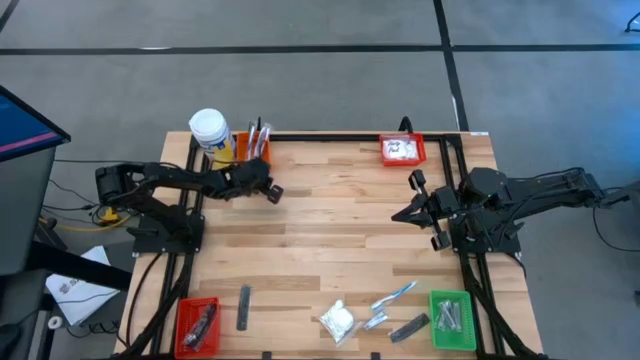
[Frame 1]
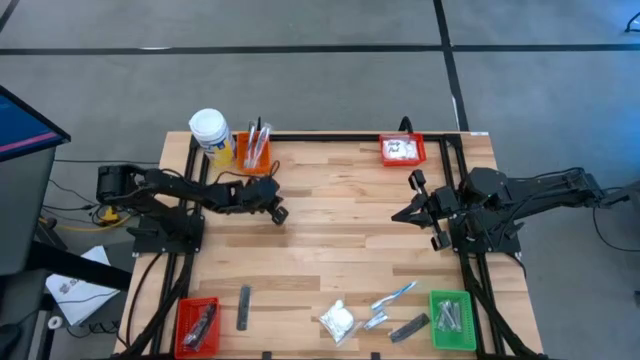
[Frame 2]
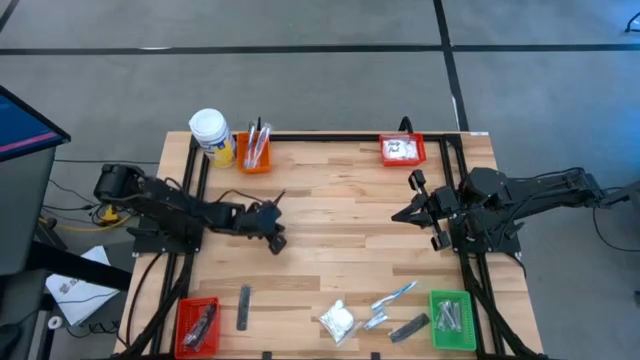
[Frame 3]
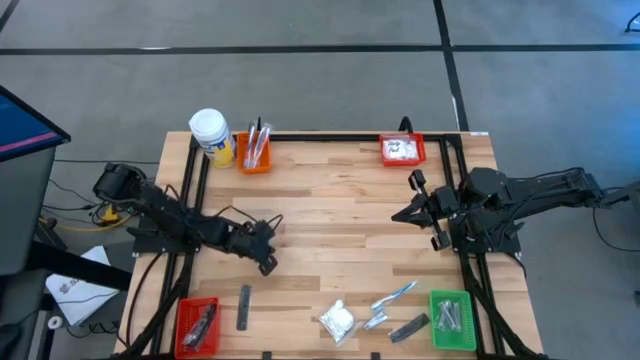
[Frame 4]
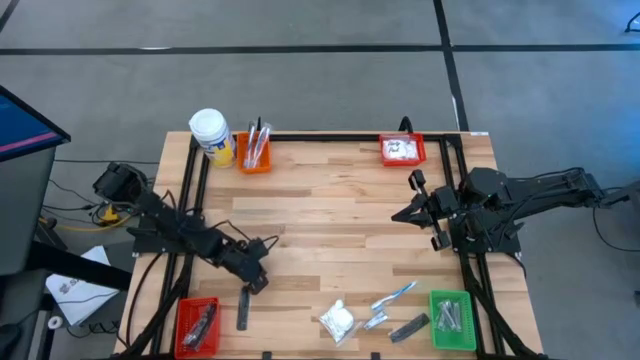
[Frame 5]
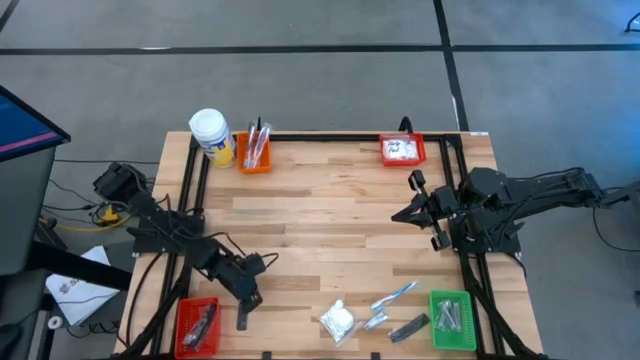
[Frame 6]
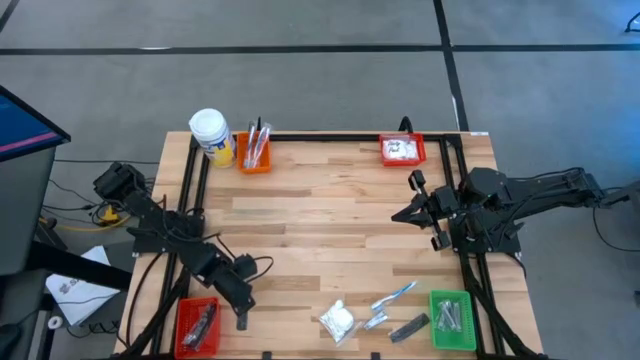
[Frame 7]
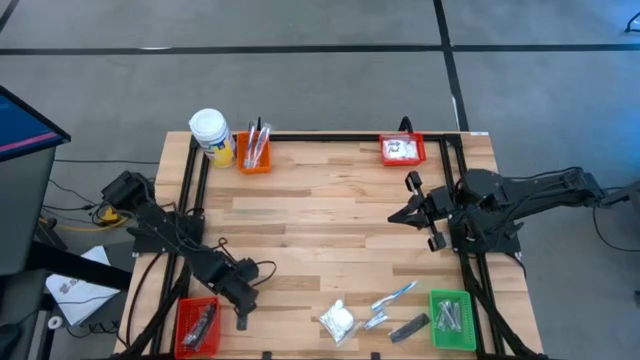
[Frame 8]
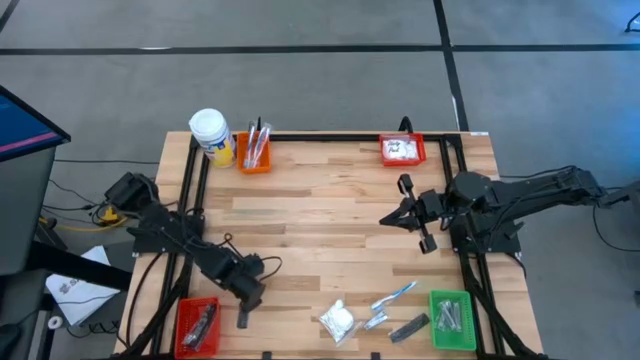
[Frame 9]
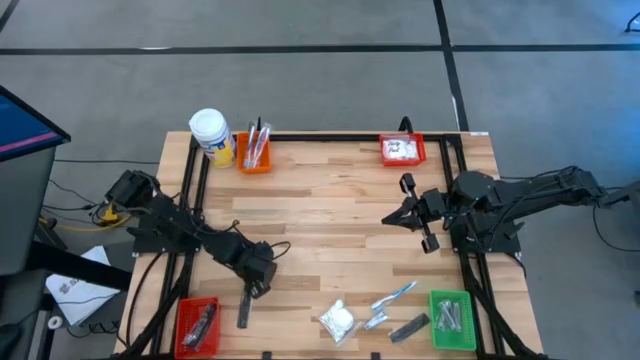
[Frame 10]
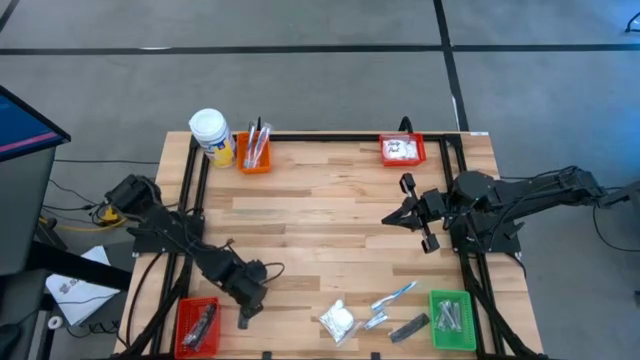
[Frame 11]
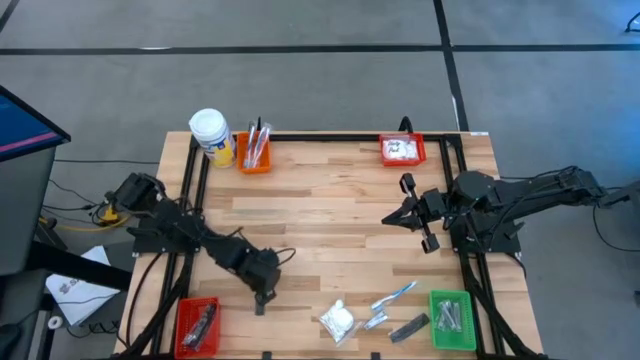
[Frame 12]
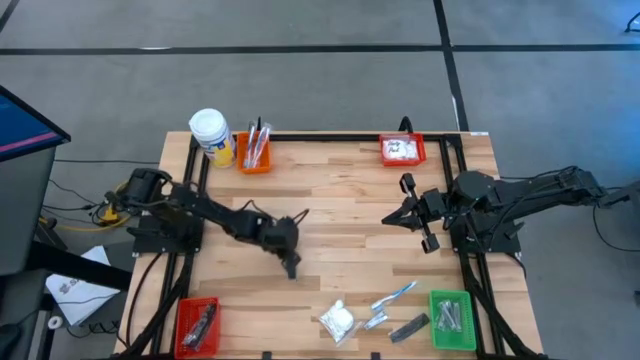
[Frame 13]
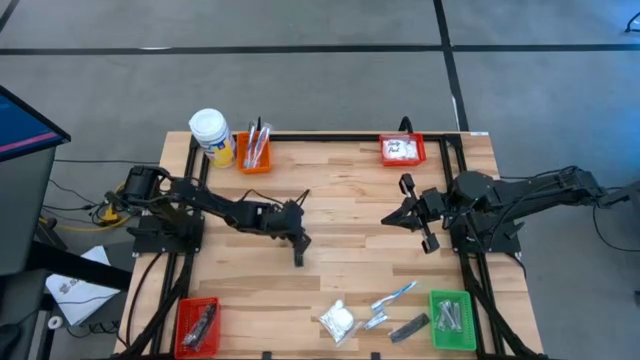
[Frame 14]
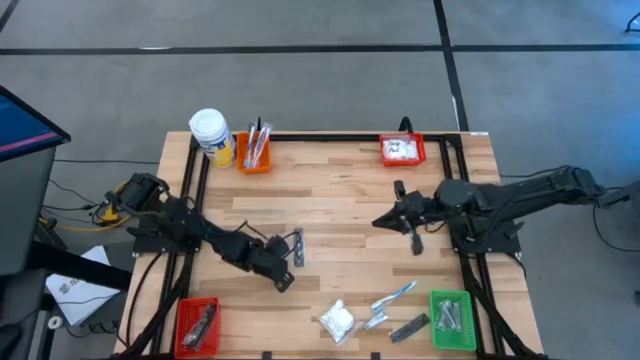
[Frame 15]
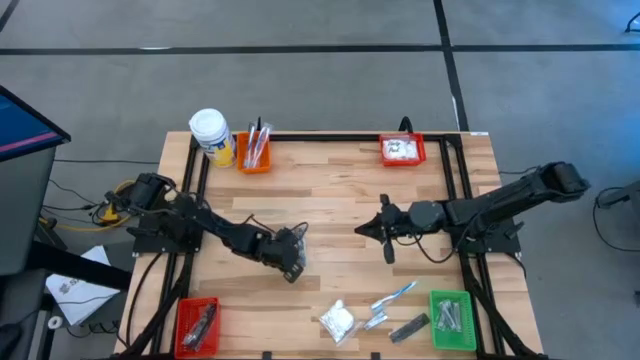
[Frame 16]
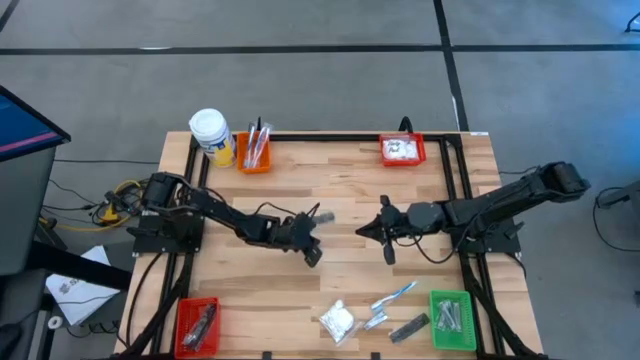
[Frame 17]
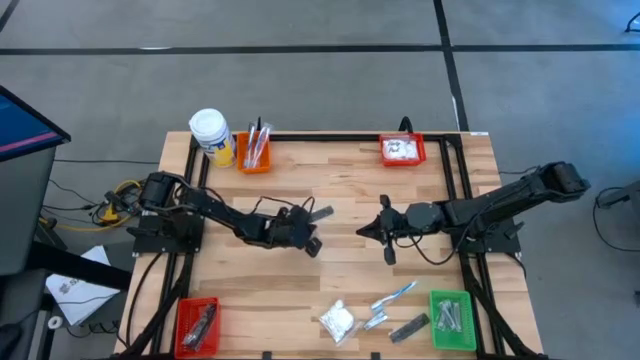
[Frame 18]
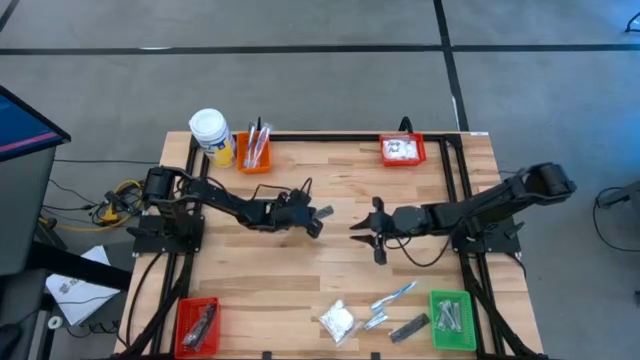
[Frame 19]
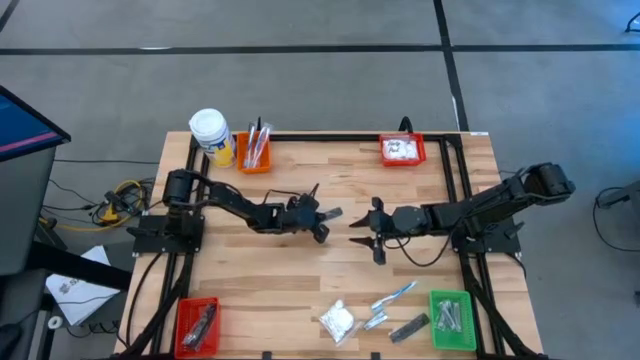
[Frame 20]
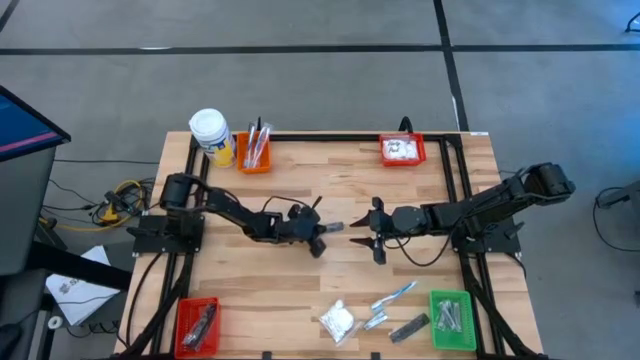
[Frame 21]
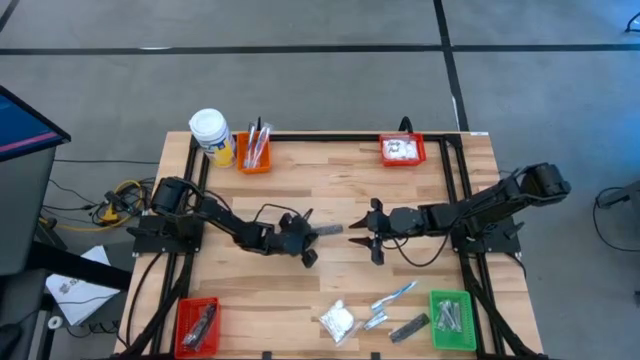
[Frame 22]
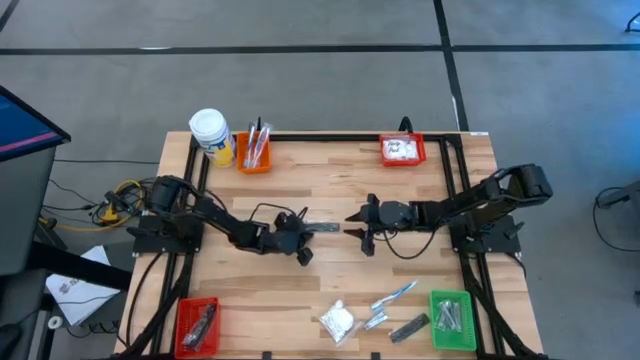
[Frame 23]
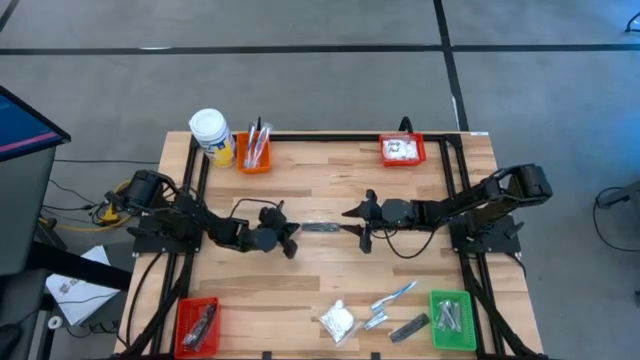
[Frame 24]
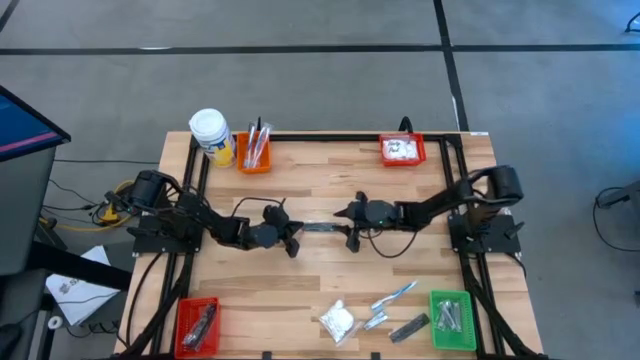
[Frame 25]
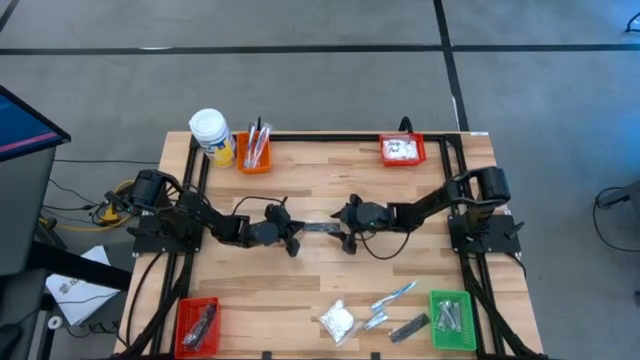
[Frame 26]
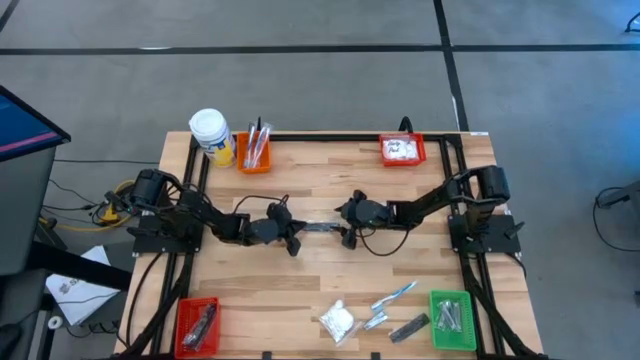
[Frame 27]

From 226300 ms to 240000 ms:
Task: Pick & Place Travel size toiletries
Put the left comb into the bottom red bin

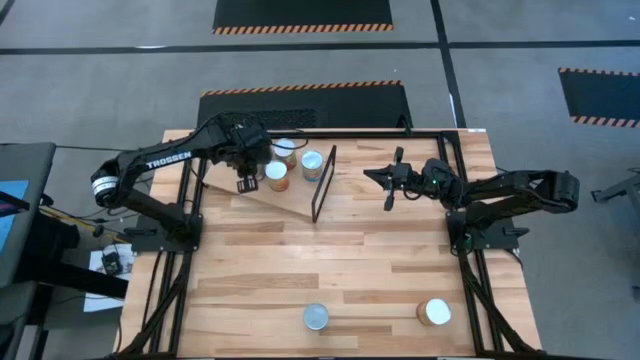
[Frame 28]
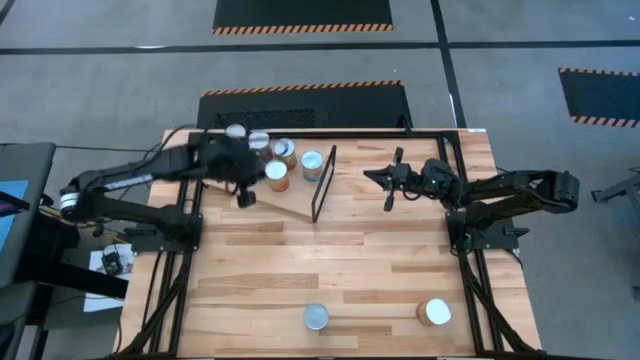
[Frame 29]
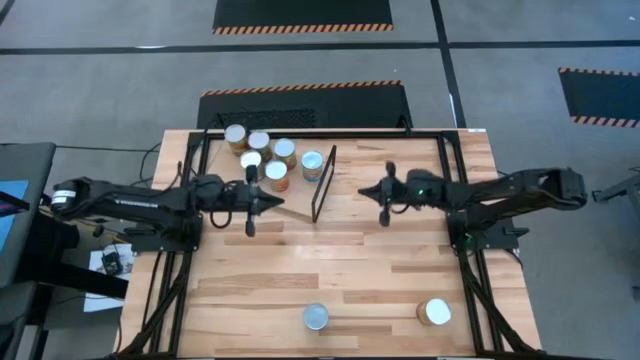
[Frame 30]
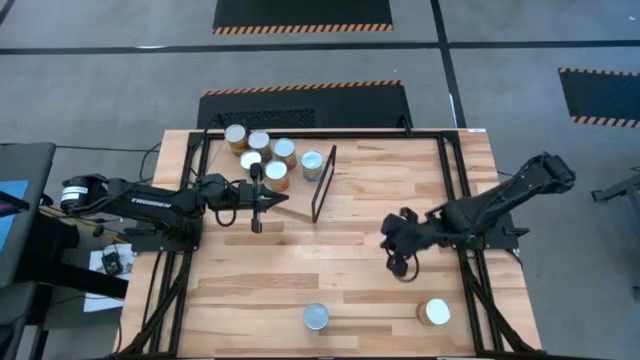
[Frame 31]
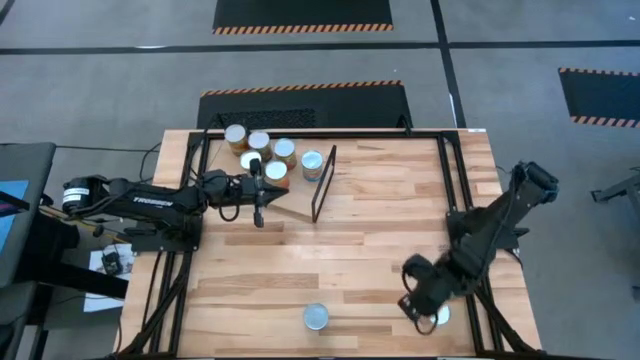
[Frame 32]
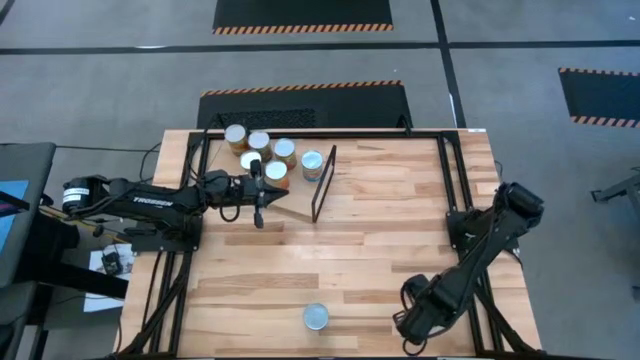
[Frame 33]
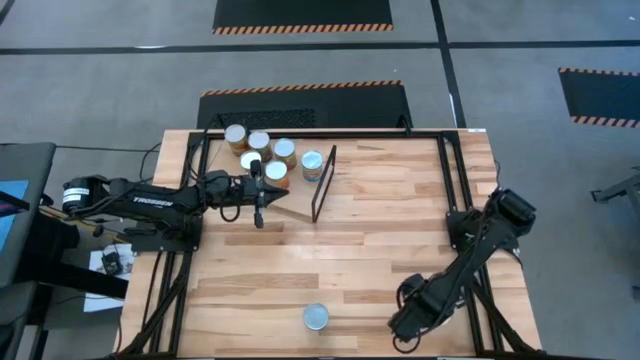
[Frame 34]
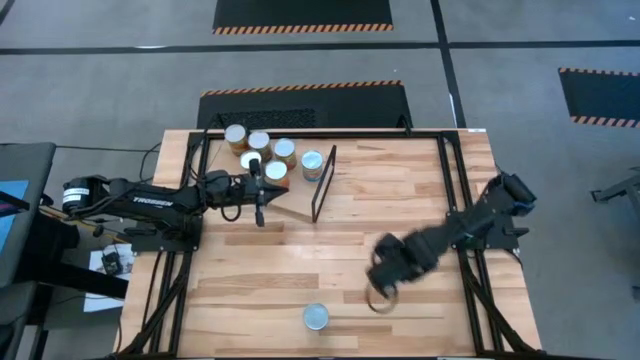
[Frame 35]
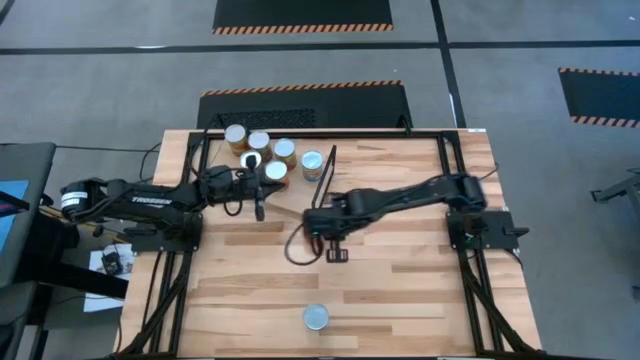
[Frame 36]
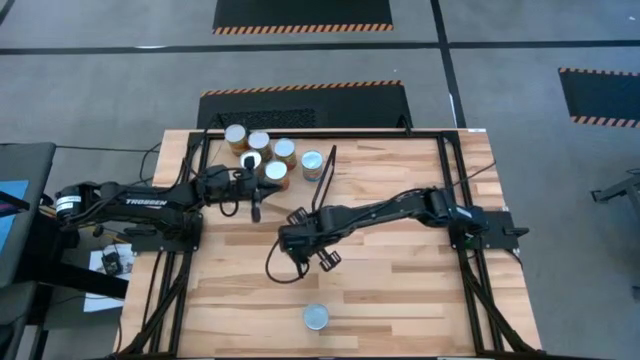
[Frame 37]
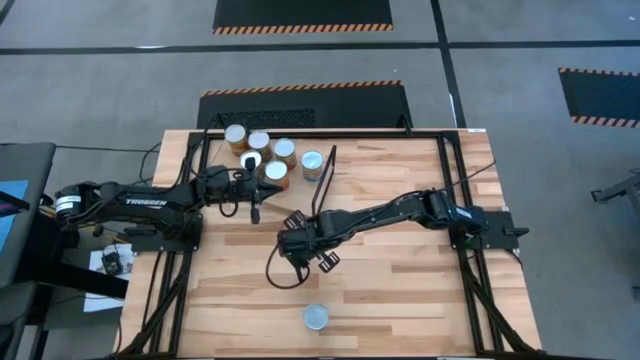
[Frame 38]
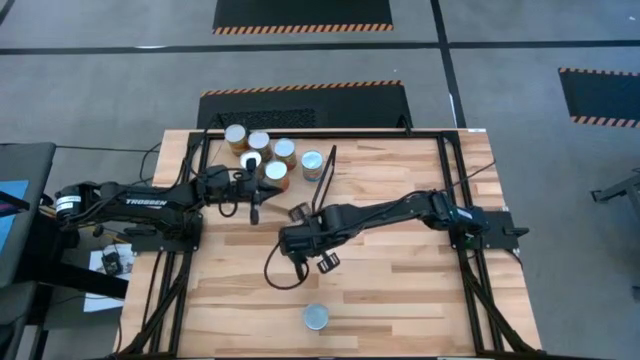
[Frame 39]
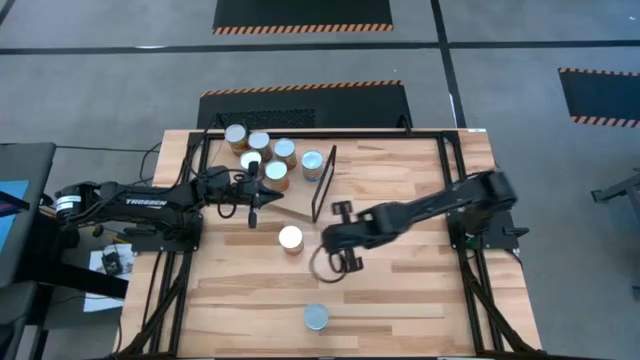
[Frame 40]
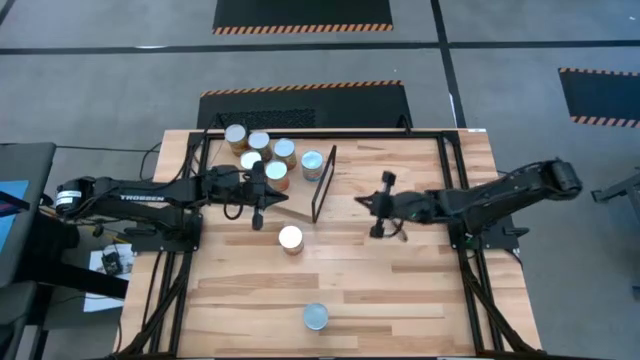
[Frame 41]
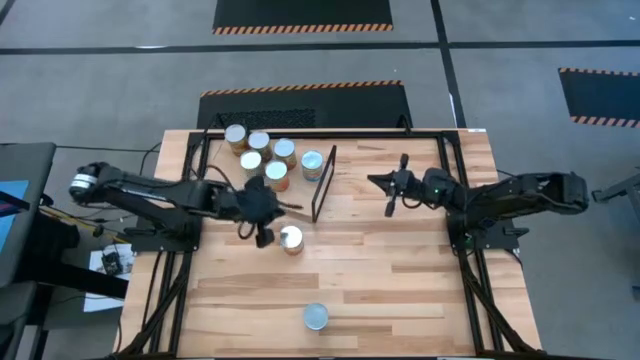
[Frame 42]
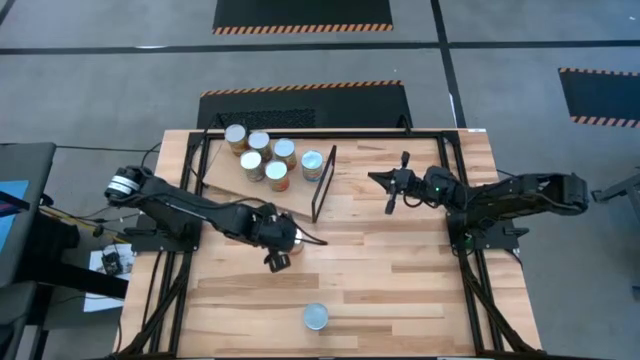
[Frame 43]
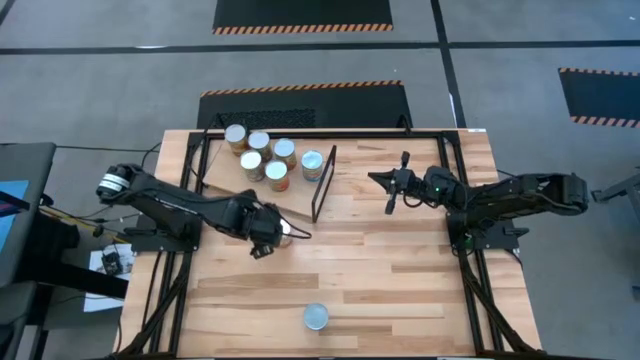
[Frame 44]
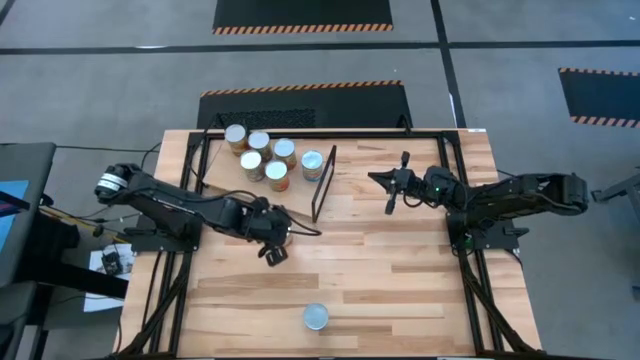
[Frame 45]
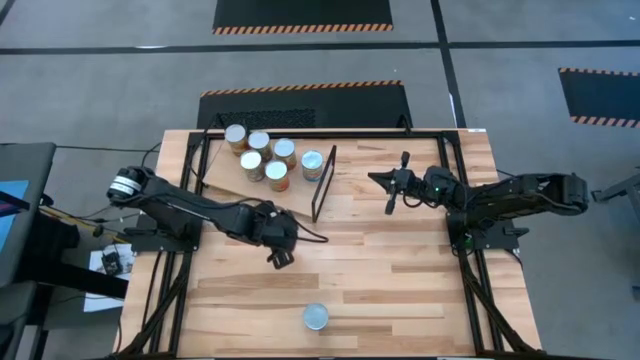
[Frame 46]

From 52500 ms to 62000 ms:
Task: Pick and place cans onto a shelf
Align the canned corn with the other canned corn on the shelf
